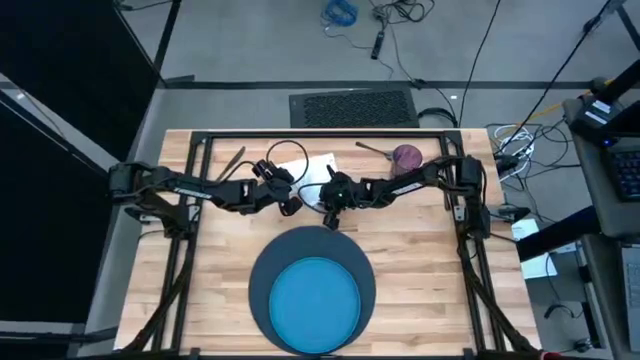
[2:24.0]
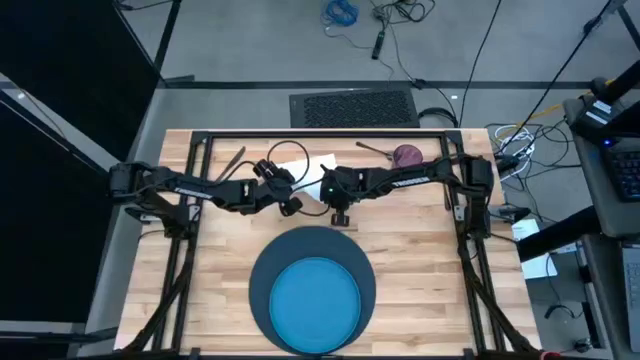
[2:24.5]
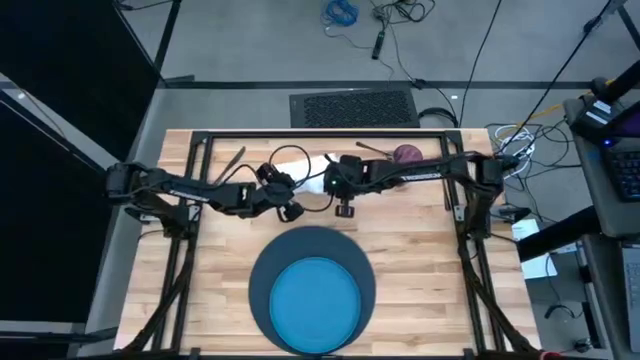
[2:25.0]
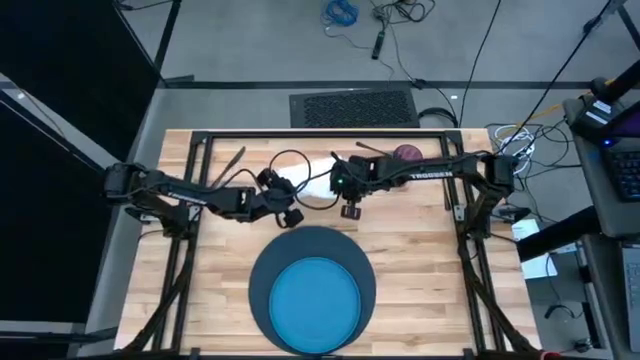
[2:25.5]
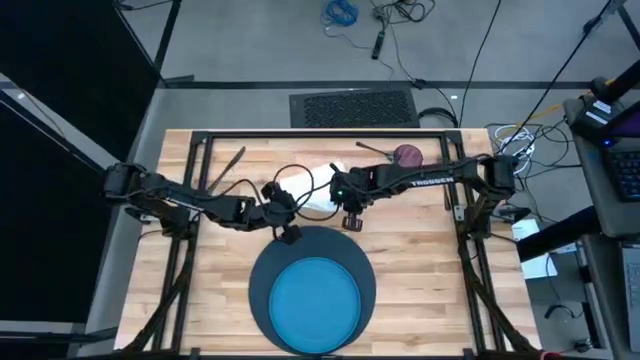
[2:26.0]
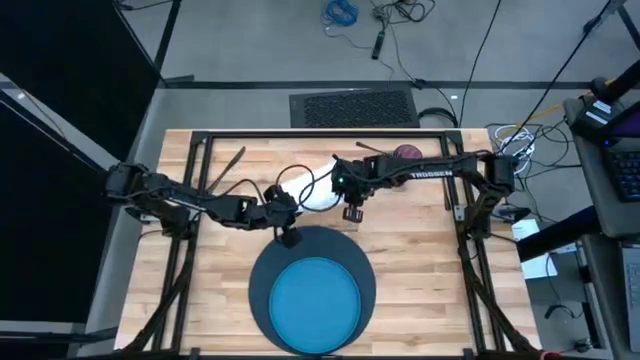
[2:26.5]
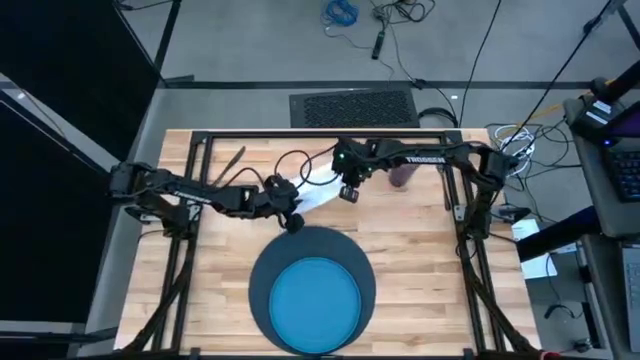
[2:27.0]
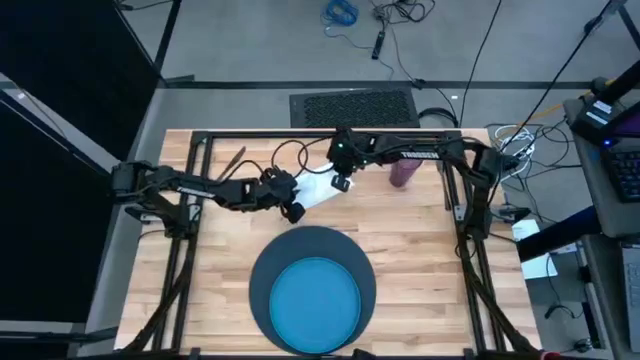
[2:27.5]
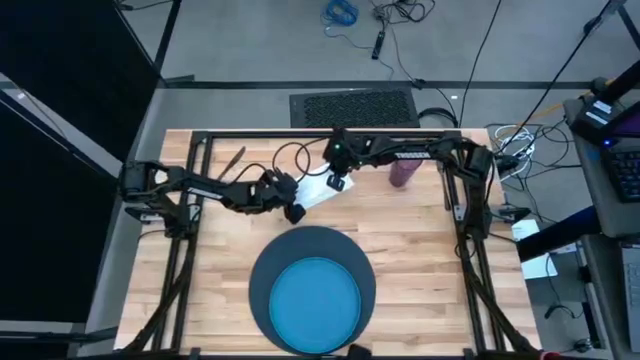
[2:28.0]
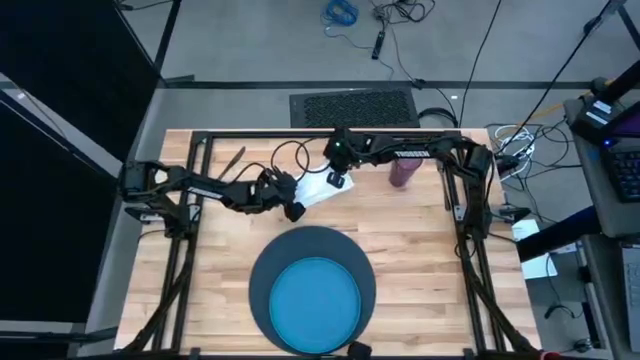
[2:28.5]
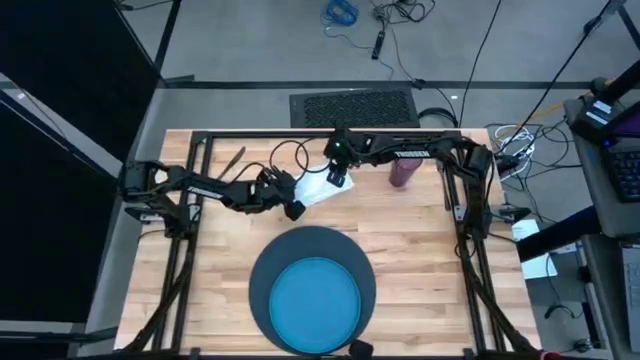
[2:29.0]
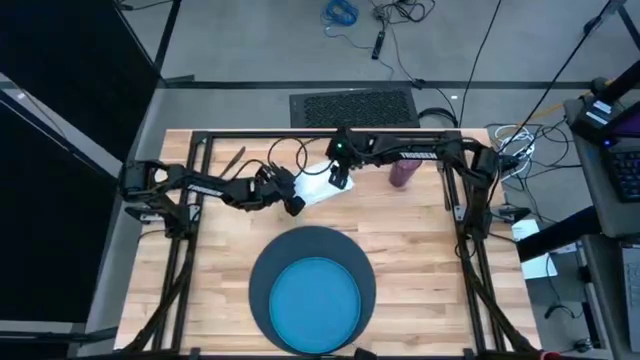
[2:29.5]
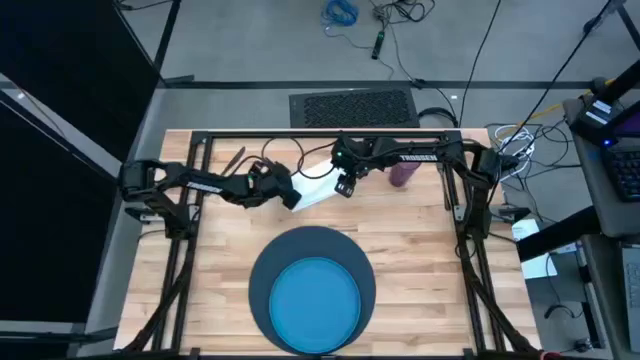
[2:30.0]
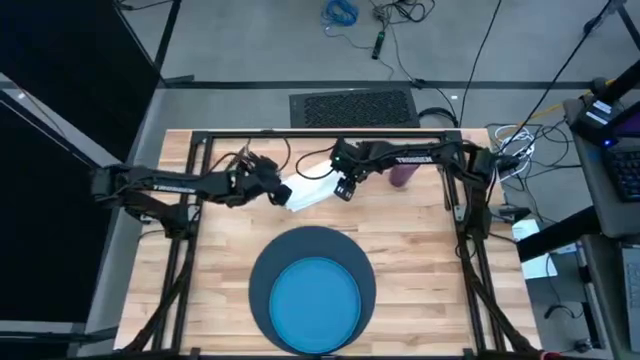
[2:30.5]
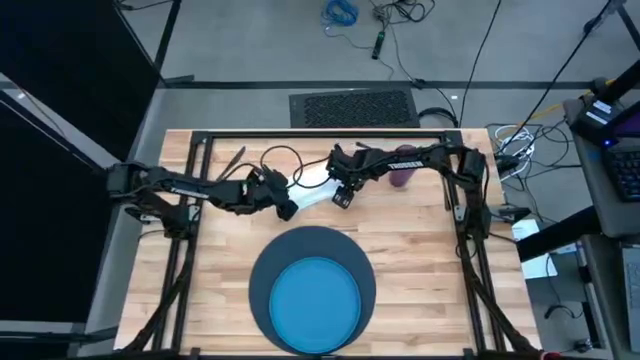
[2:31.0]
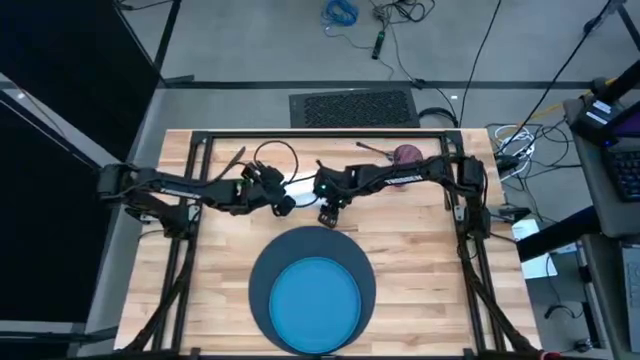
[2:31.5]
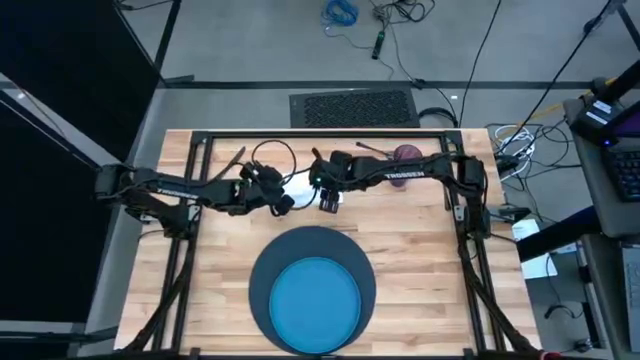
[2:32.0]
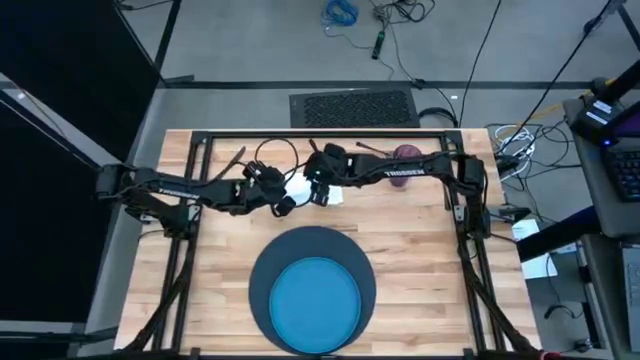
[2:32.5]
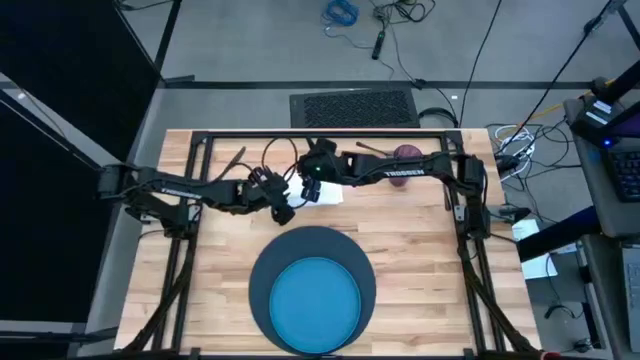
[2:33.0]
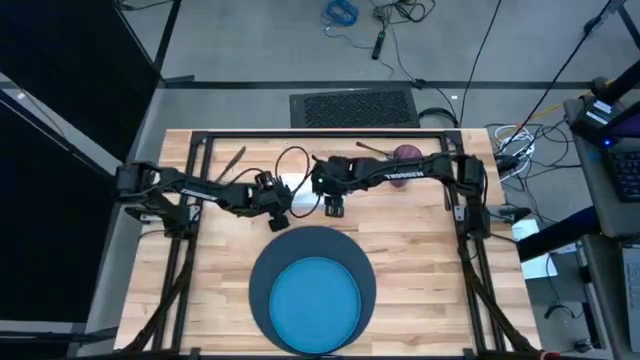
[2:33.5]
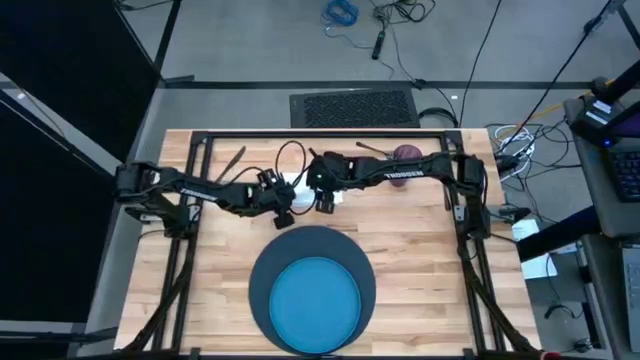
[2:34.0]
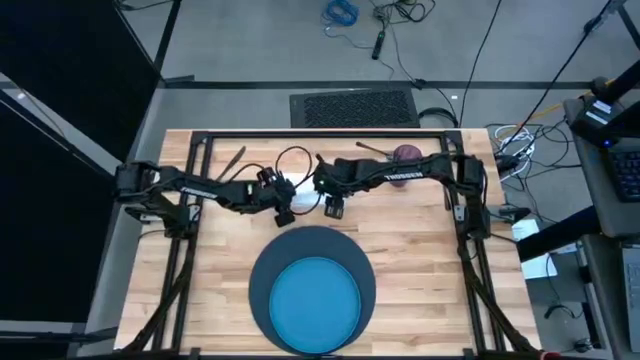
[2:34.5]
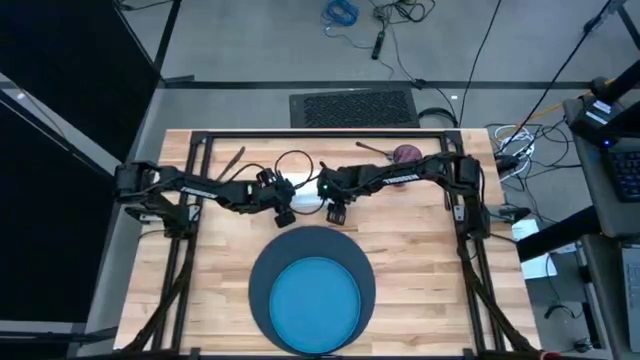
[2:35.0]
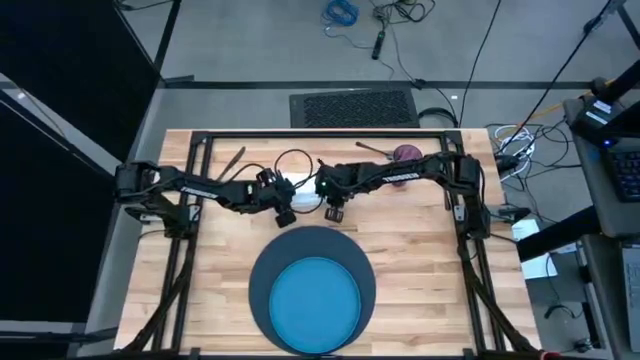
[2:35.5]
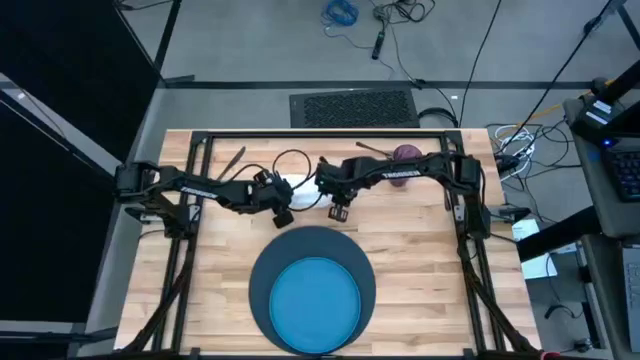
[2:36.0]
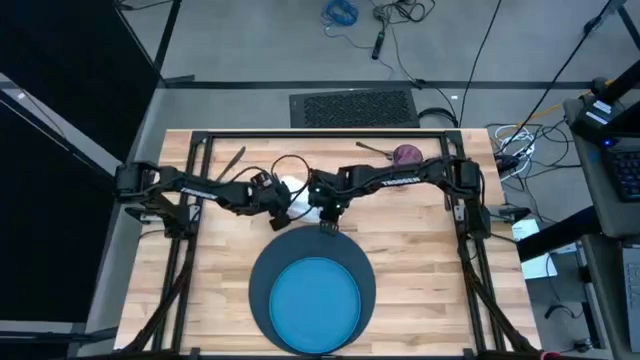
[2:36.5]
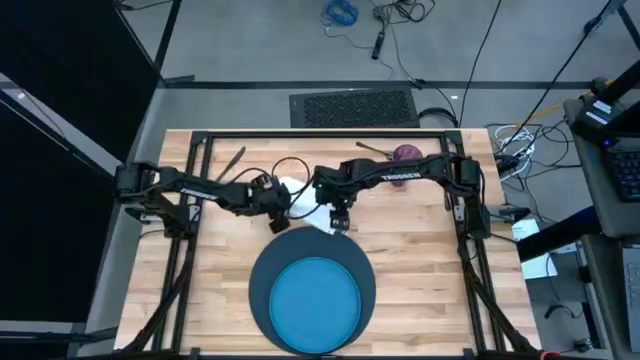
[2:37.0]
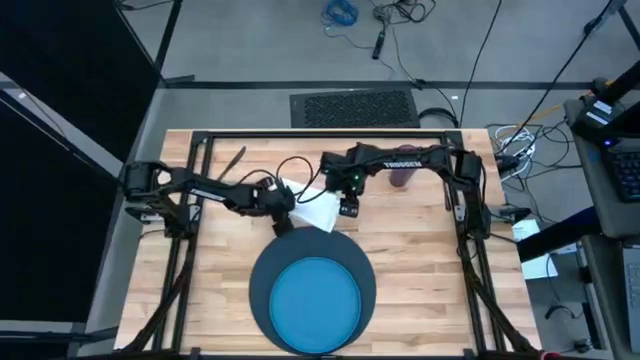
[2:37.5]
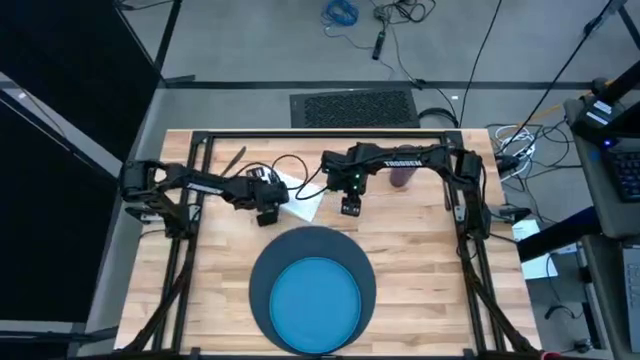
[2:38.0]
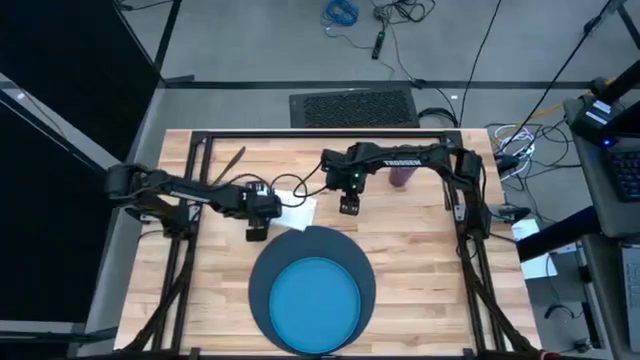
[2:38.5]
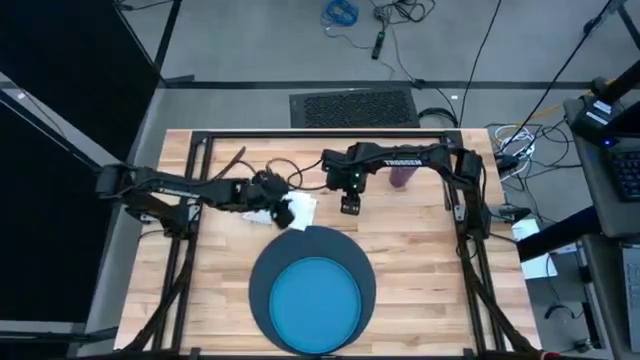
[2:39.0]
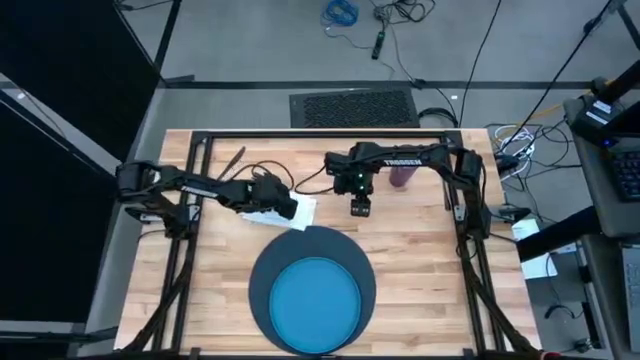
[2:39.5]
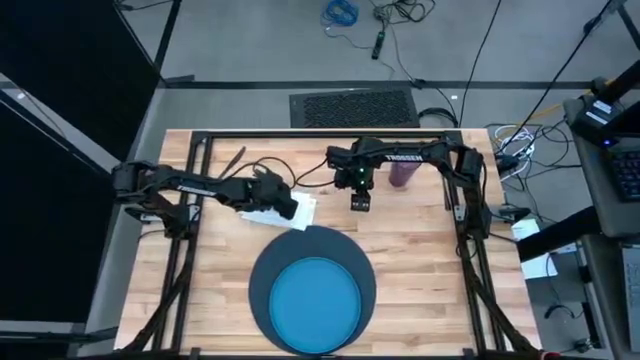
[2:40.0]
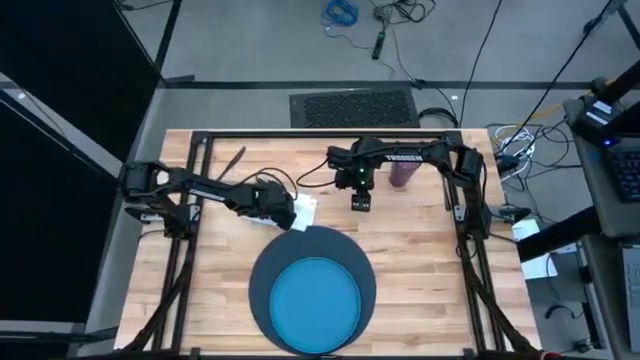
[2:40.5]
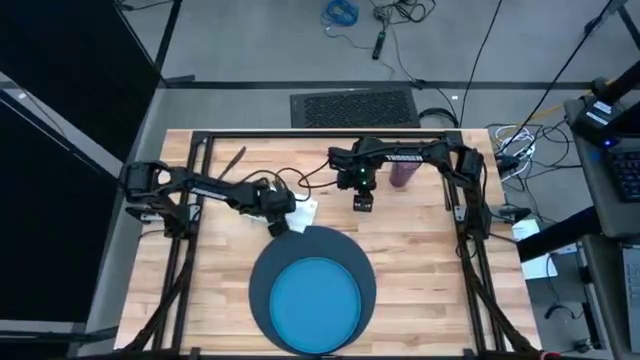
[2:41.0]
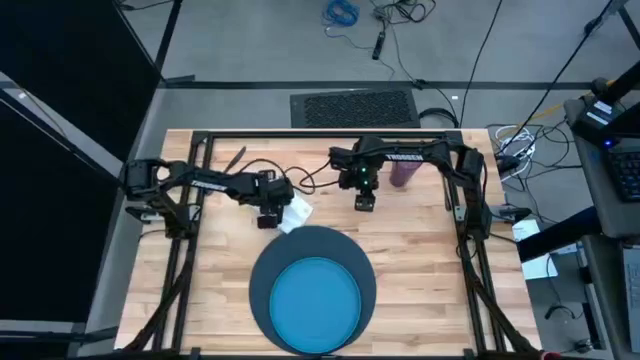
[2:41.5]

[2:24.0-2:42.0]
Task: Set table place
Fold the white napkin

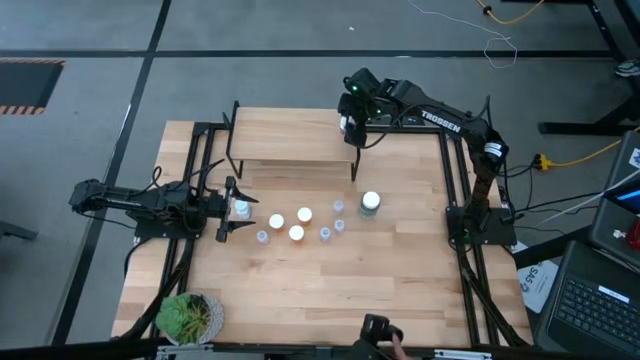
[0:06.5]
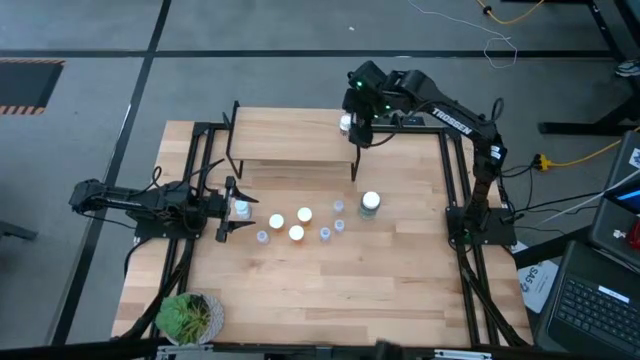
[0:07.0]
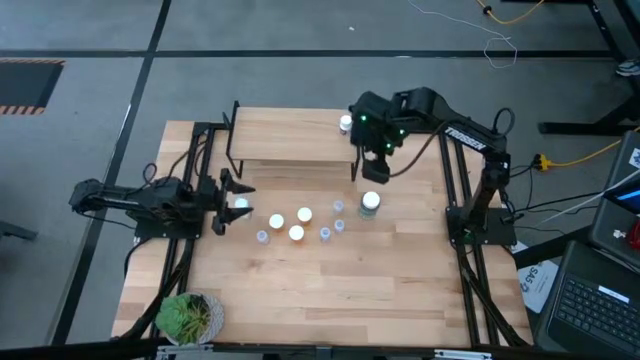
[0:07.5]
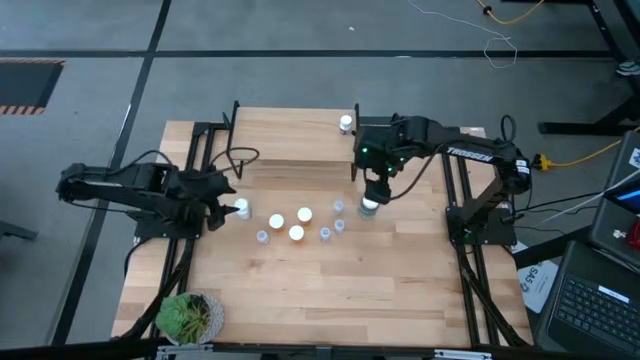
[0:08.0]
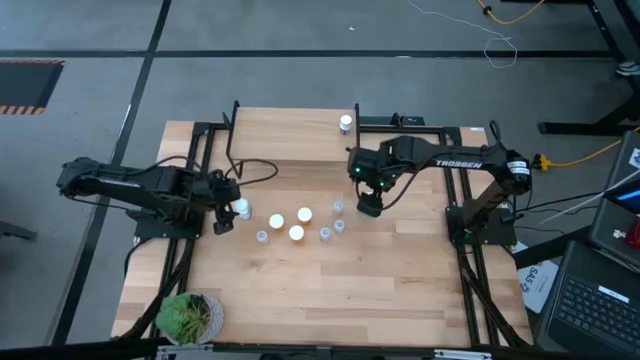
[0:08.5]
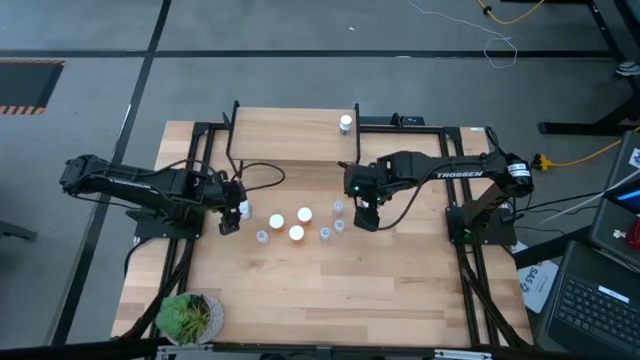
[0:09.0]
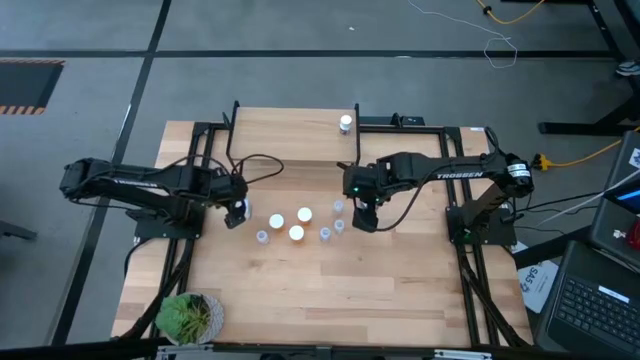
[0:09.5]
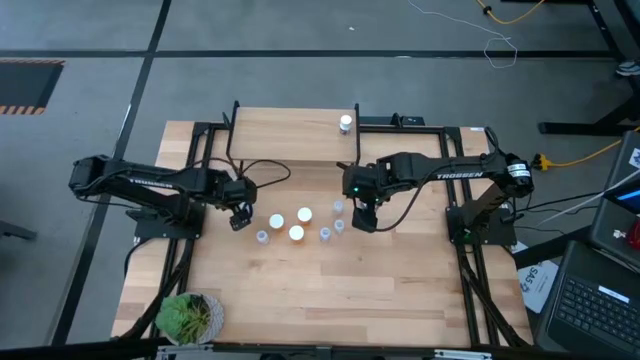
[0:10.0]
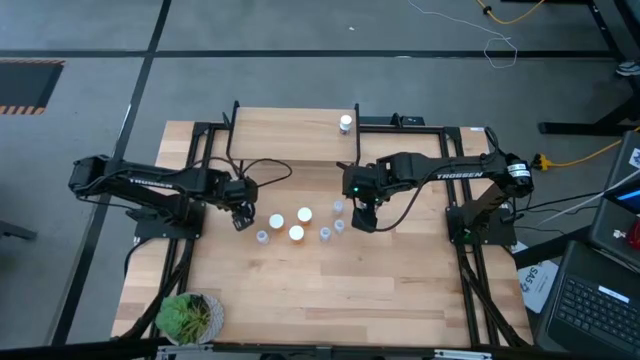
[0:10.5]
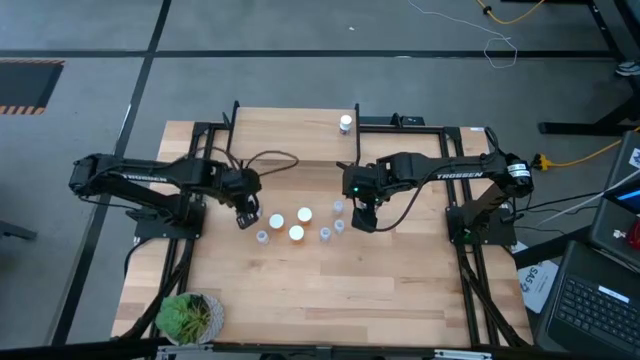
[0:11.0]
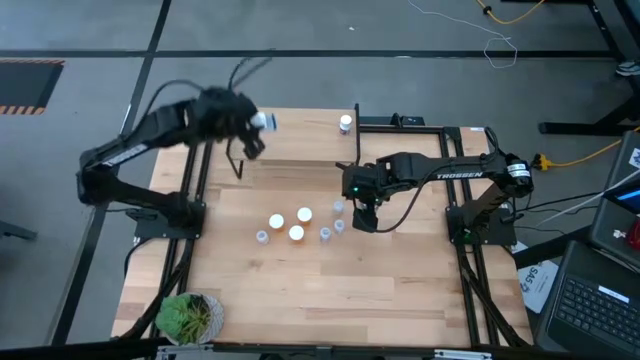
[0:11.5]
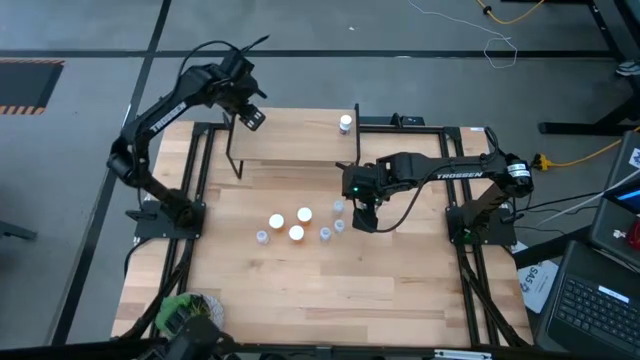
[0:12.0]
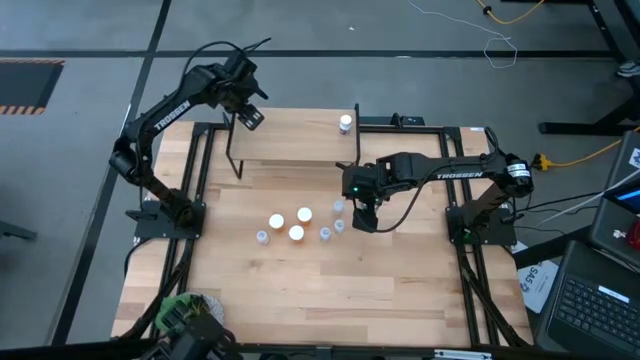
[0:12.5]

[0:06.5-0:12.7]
Task: Pick and place medicine bottles onto shelf by color
Put the white pill bottle on the shelf
